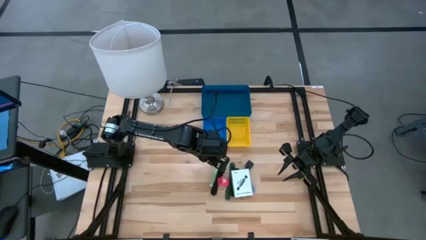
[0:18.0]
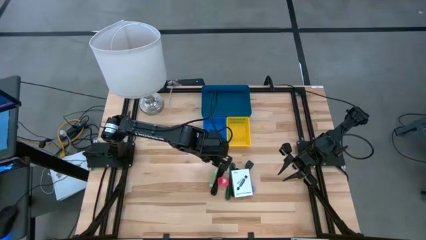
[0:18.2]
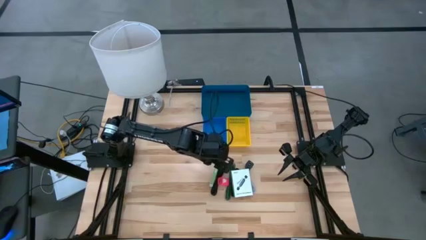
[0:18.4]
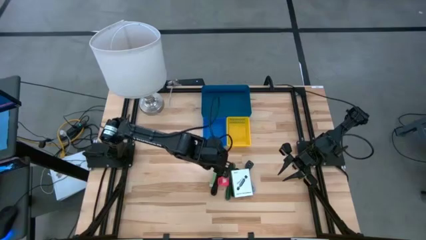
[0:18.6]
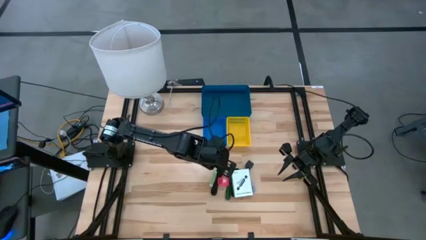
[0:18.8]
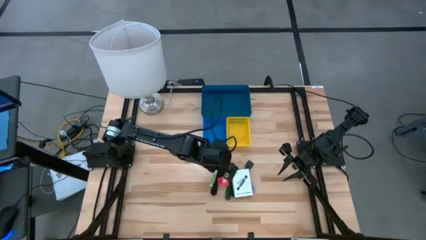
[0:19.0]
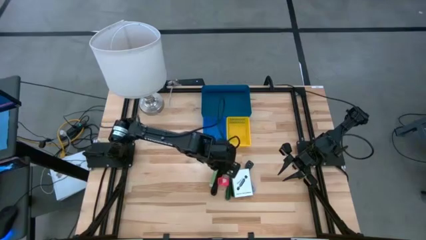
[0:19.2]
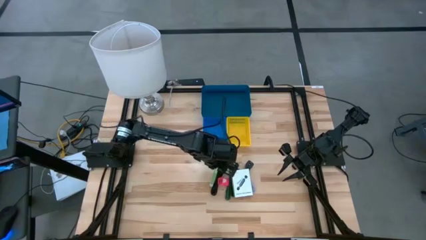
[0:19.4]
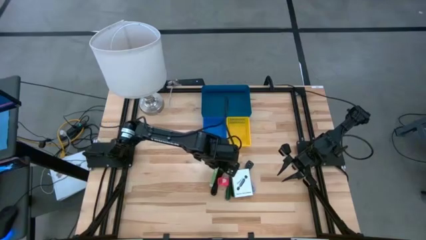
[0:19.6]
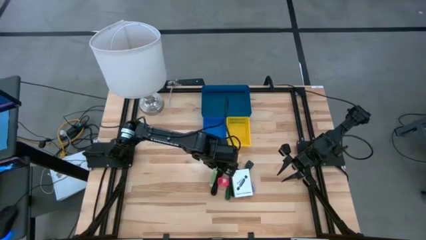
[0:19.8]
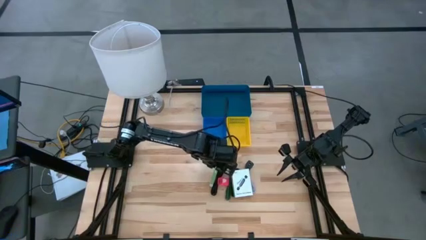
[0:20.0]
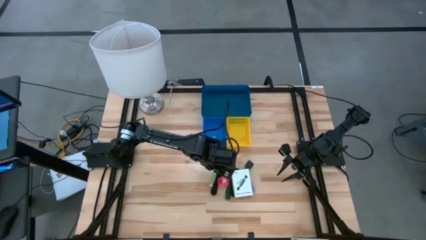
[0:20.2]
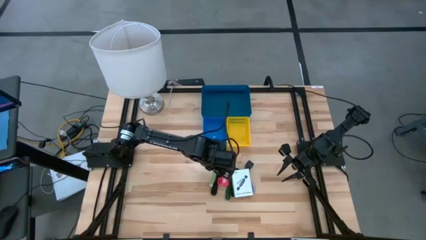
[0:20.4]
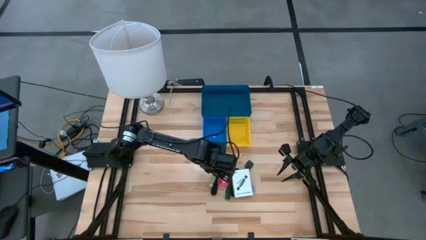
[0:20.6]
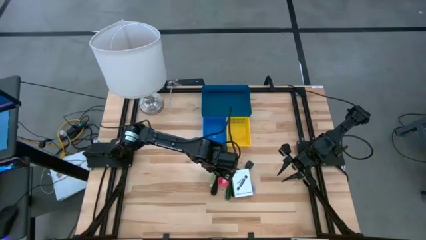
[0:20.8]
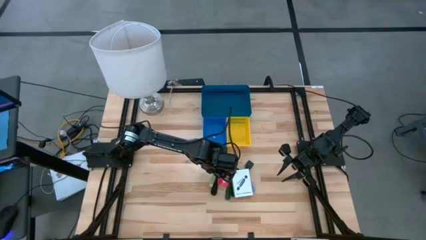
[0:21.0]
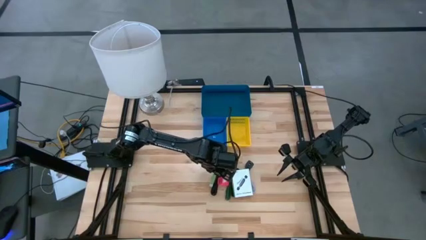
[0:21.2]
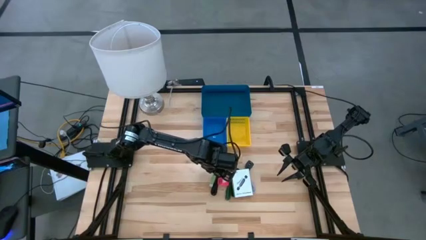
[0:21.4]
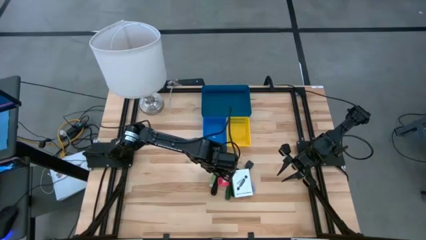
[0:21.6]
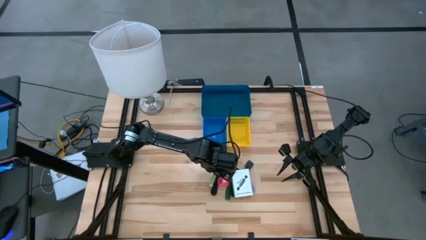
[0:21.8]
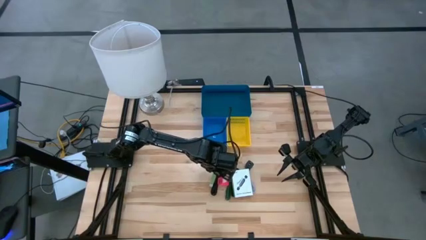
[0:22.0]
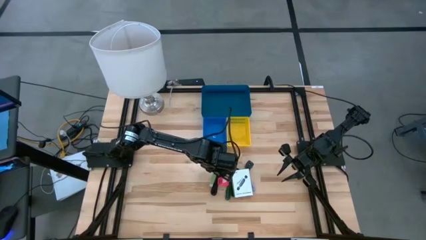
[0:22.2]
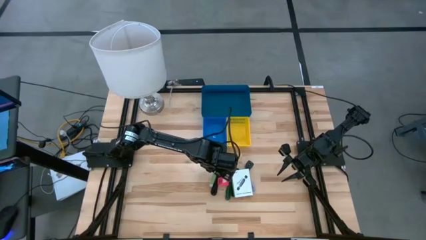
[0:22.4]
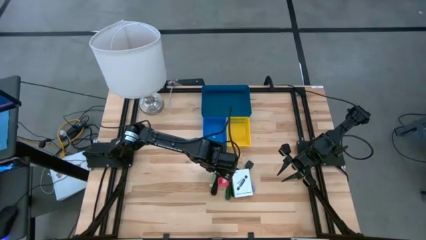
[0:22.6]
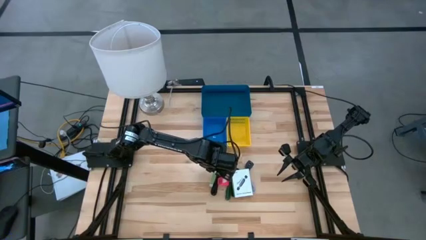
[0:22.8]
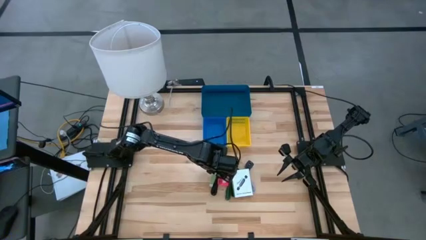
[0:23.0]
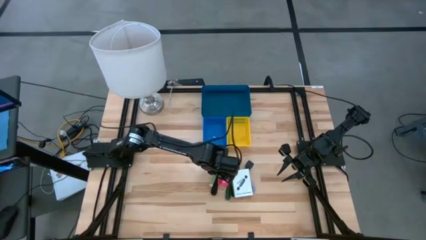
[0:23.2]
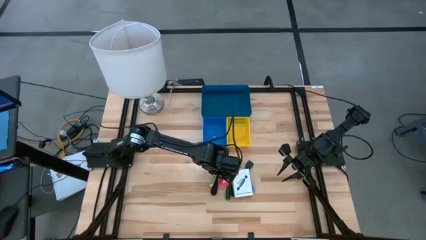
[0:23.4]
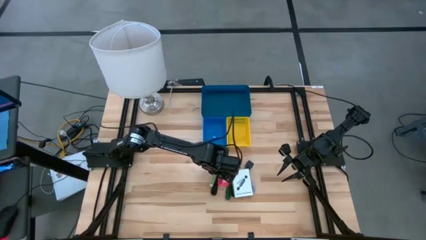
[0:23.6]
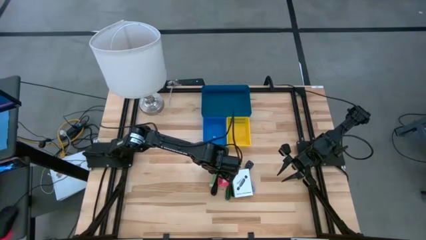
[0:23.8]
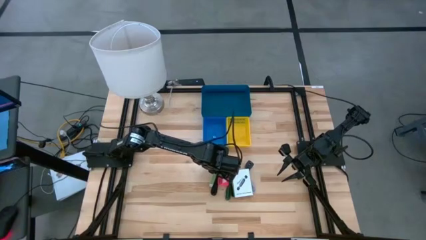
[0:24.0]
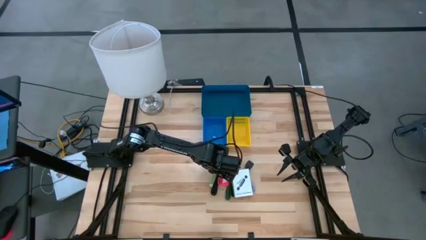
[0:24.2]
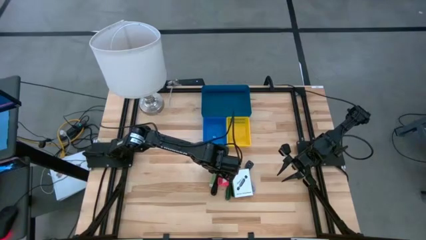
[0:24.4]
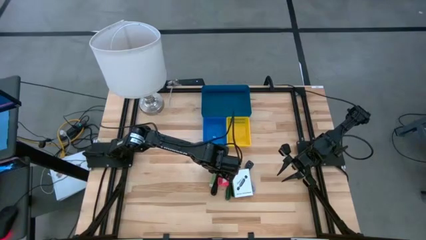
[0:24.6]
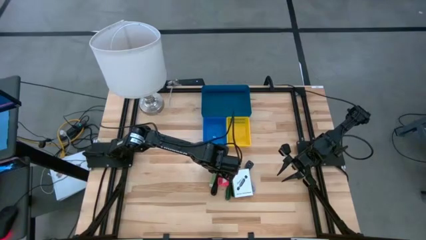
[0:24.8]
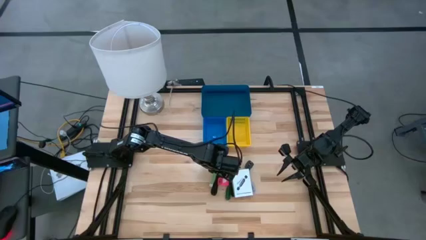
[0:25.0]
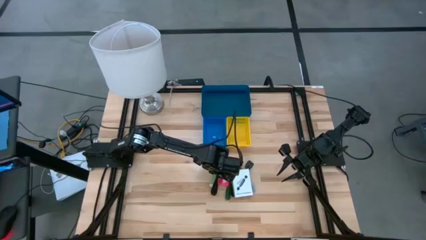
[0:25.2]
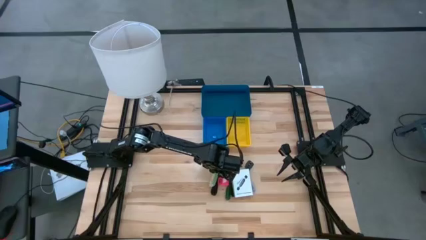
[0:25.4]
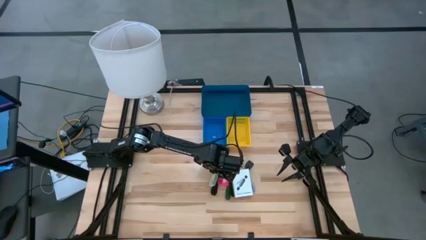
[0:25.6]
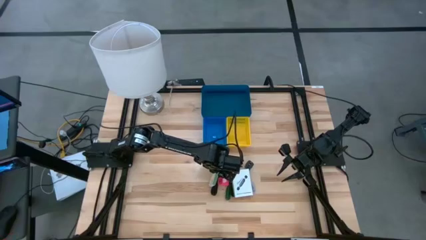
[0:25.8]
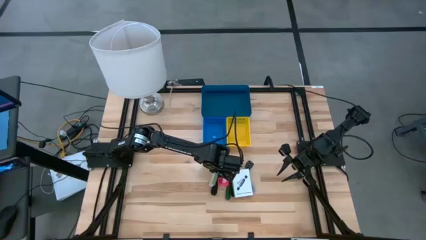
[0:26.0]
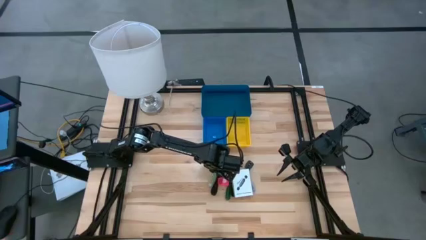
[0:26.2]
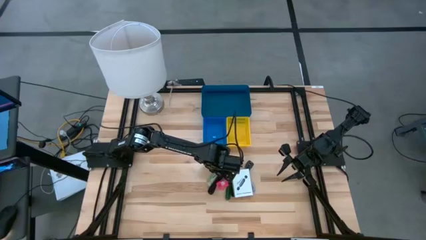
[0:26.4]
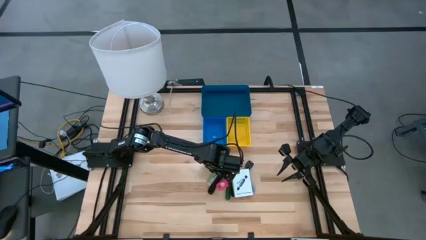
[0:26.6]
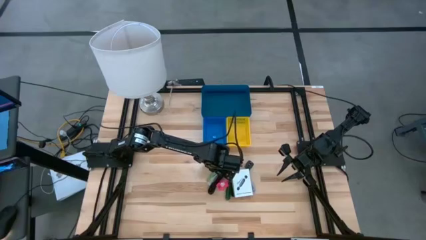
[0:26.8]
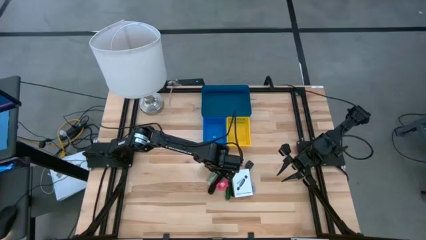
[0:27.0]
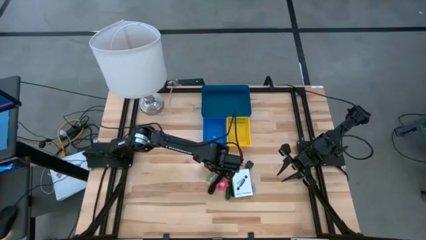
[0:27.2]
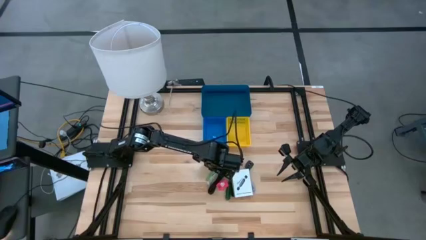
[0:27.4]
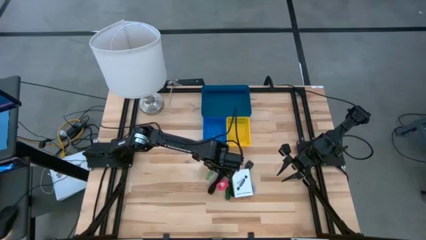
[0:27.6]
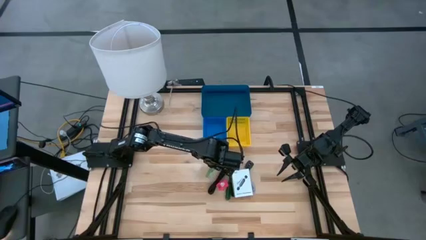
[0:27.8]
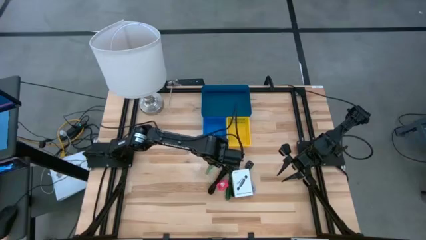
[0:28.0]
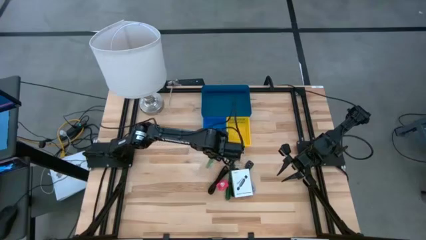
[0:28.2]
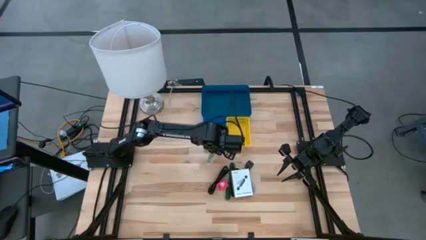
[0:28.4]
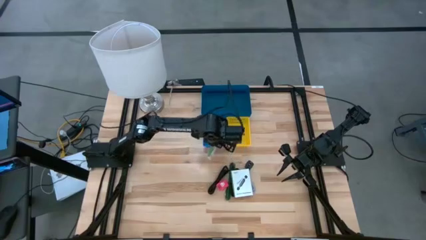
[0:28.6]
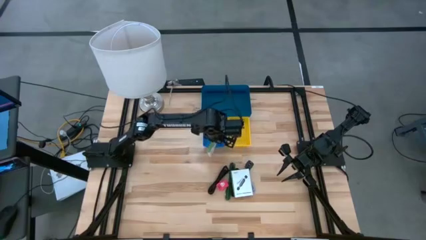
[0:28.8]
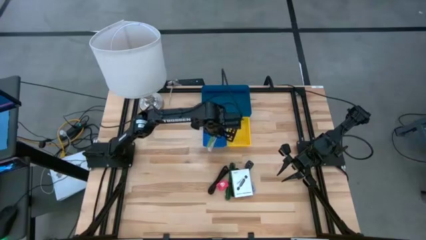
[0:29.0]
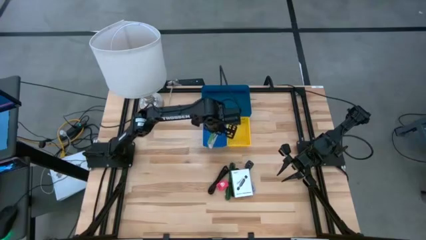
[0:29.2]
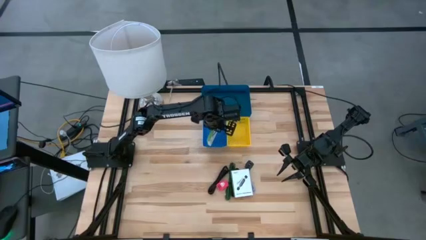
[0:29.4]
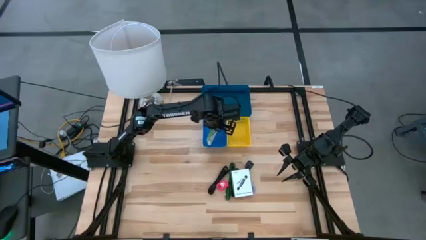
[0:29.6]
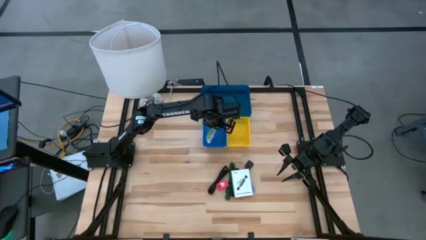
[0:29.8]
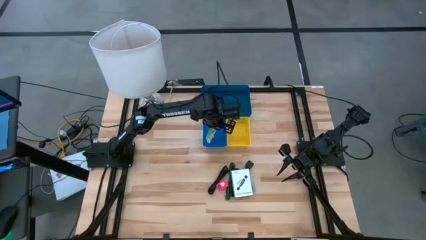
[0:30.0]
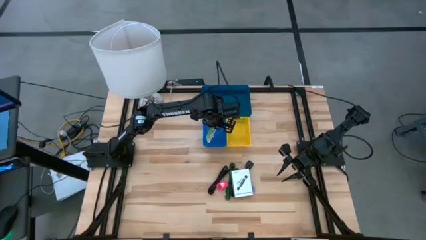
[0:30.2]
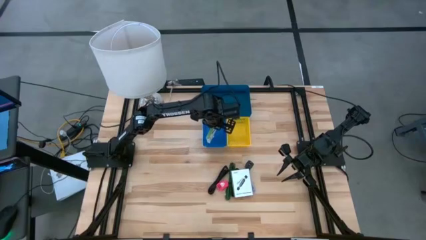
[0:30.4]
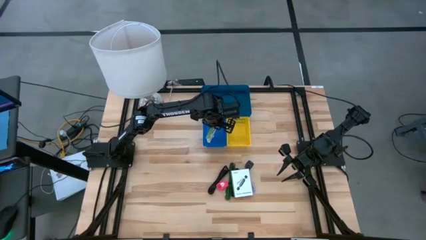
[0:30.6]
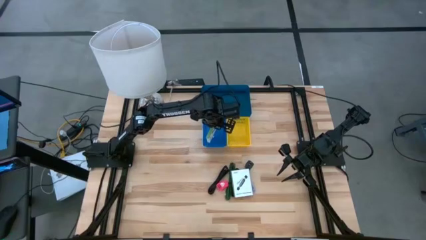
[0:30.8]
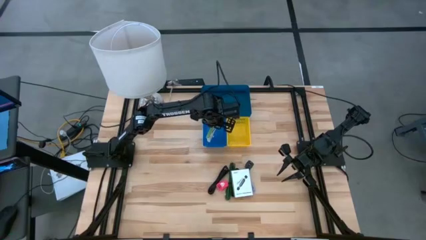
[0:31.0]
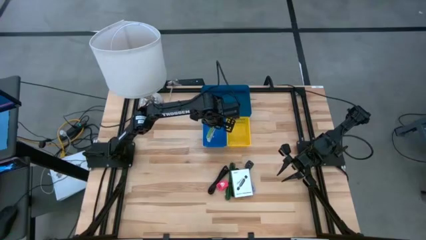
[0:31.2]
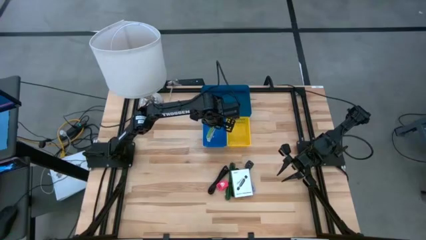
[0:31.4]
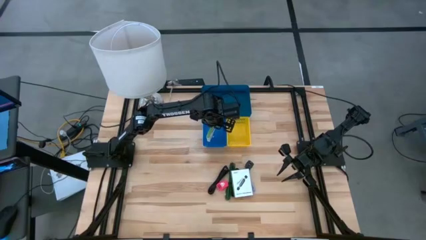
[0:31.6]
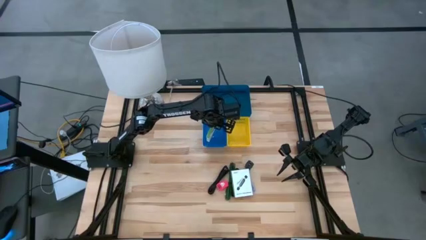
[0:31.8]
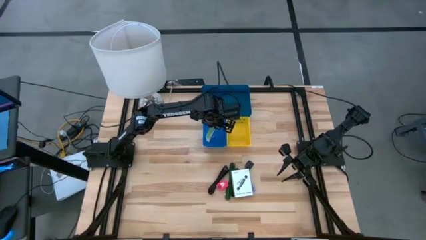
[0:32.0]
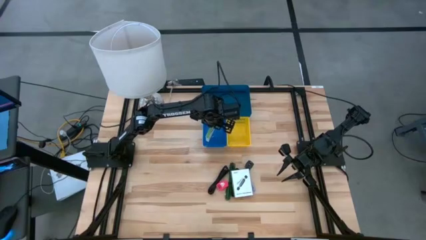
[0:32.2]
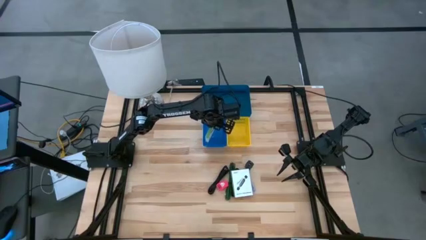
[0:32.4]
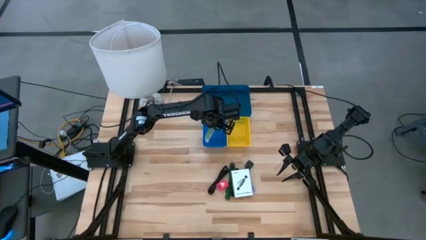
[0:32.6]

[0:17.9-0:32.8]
Task: Pick and place items into bin
Put the card reader box into the blue bin

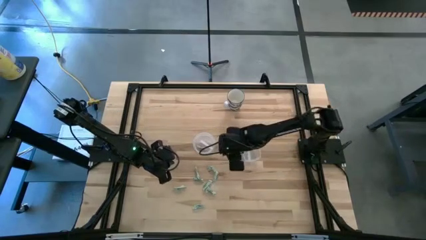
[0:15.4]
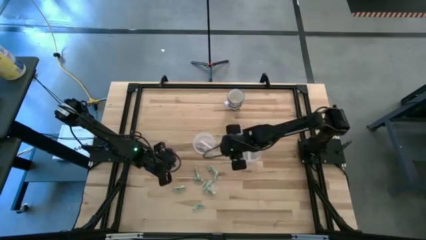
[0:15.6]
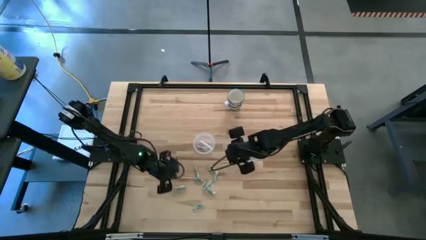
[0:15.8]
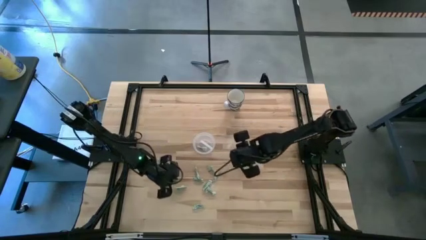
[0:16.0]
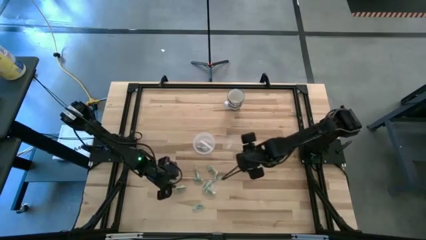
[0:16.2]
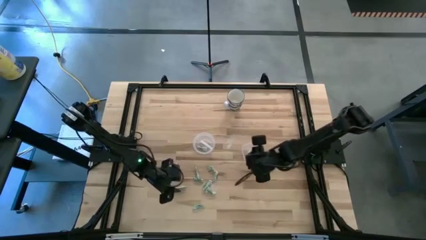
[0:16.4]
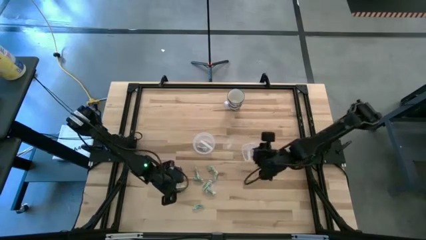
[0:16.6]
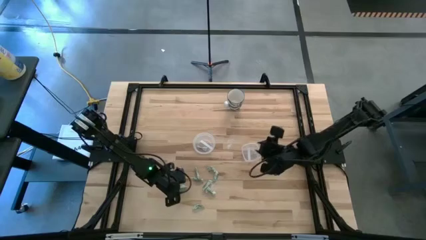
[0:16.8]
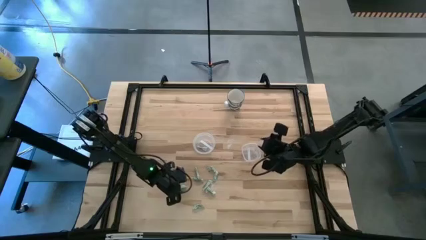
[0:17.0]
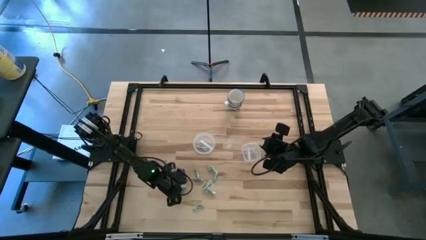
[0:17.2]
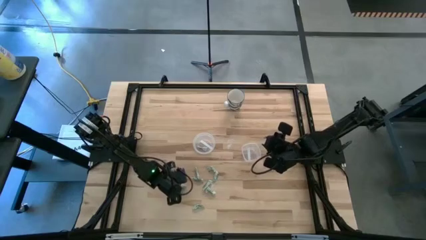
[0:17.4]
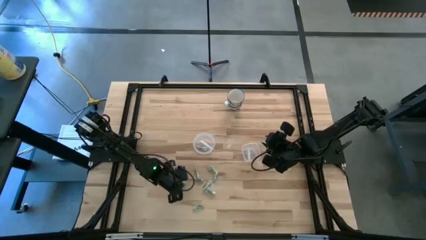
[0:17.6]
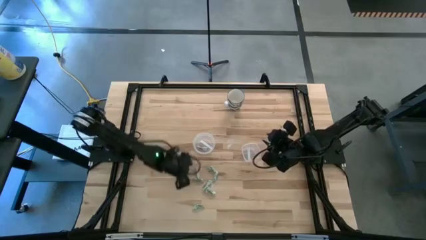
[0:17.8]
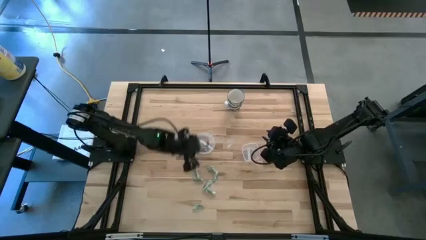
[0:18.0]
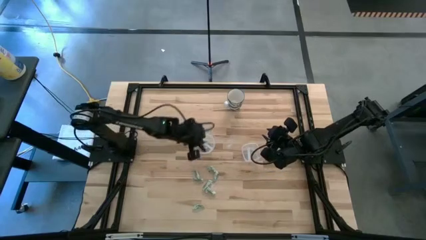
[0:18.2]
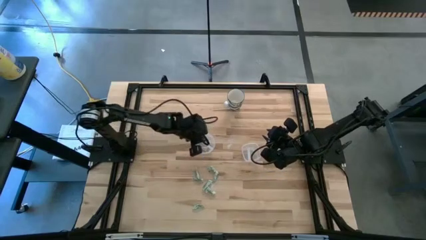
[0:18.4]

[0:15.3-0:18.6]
Task: Pick and place Stevia / Truvia into bins
Put the green stevia packet into the left transparent container
